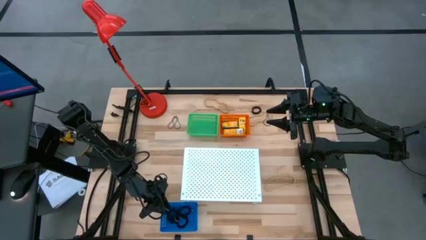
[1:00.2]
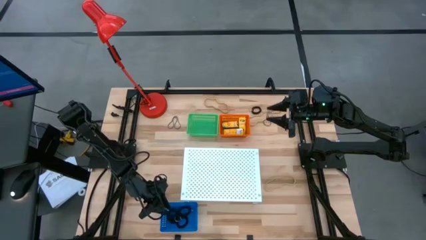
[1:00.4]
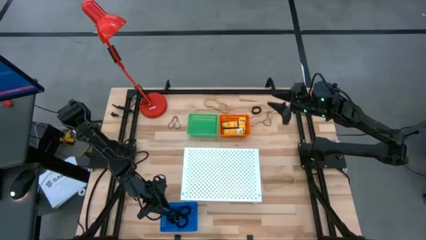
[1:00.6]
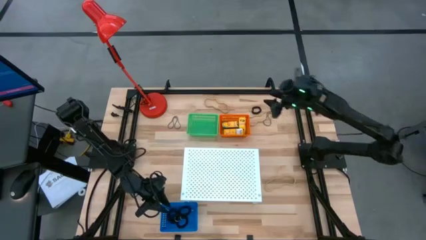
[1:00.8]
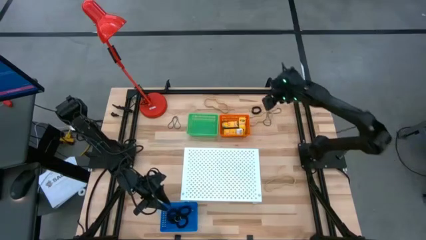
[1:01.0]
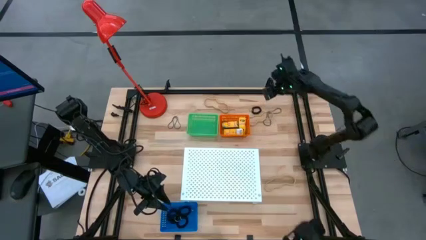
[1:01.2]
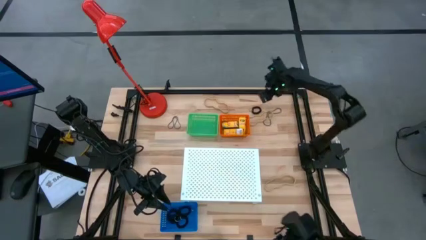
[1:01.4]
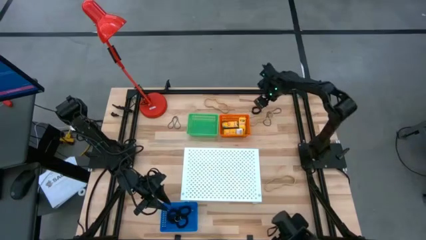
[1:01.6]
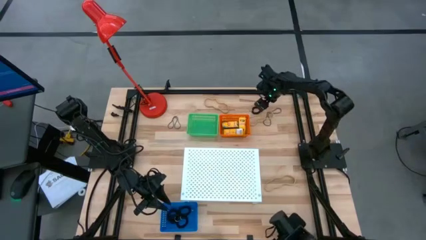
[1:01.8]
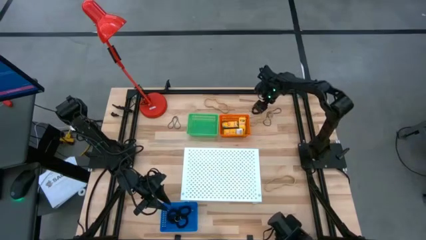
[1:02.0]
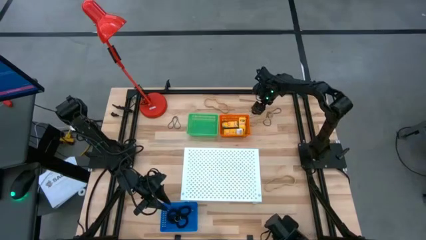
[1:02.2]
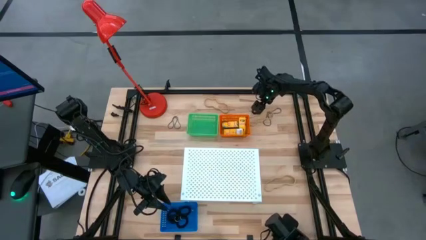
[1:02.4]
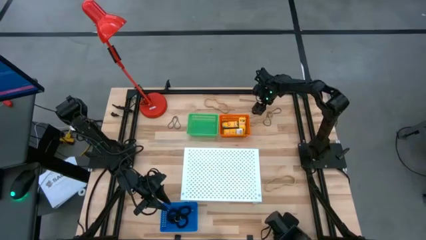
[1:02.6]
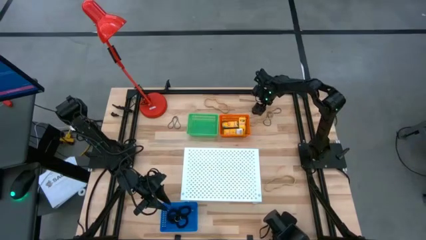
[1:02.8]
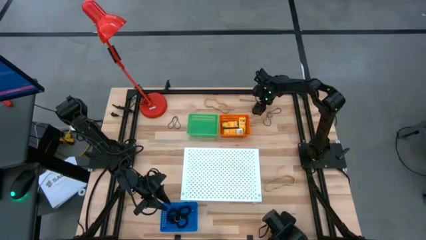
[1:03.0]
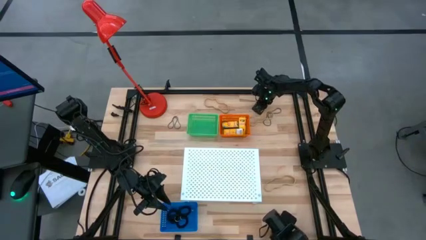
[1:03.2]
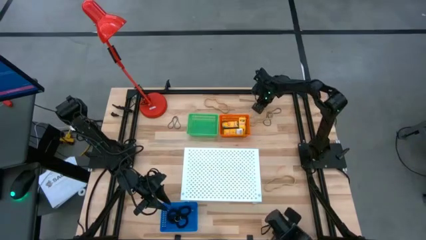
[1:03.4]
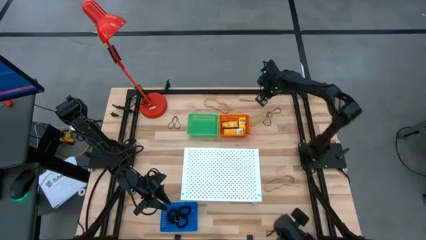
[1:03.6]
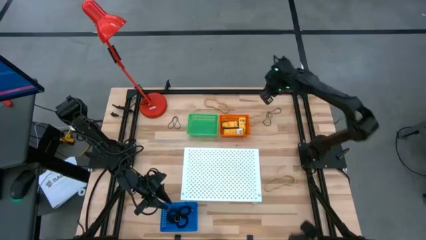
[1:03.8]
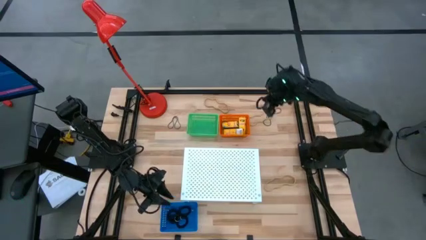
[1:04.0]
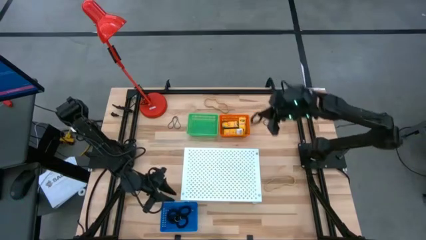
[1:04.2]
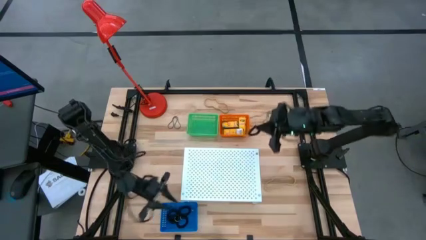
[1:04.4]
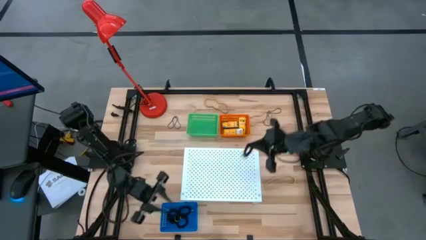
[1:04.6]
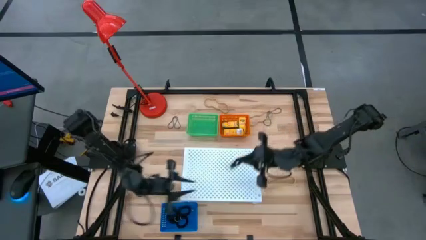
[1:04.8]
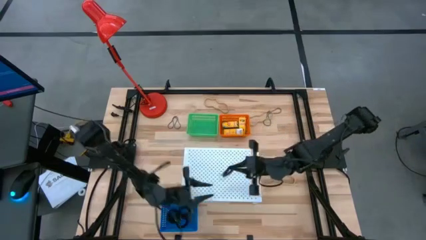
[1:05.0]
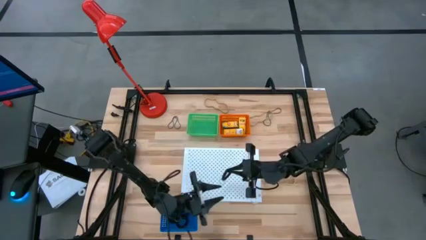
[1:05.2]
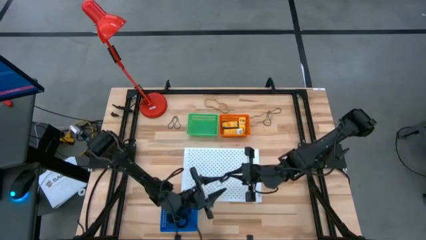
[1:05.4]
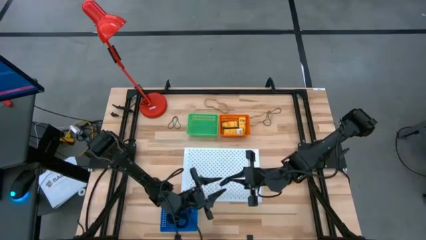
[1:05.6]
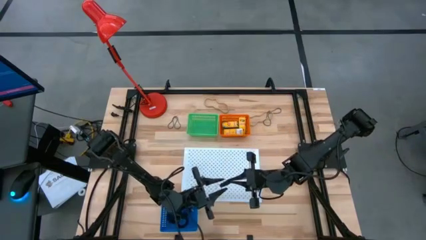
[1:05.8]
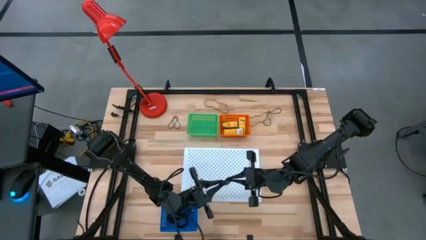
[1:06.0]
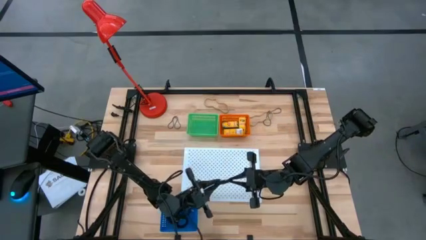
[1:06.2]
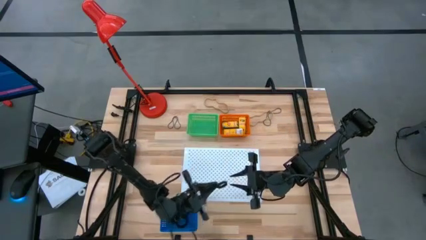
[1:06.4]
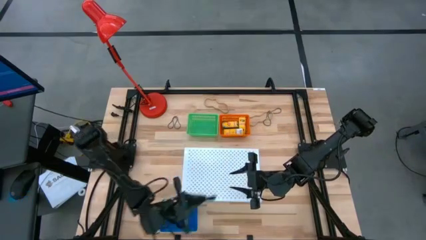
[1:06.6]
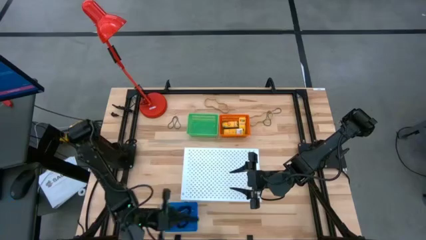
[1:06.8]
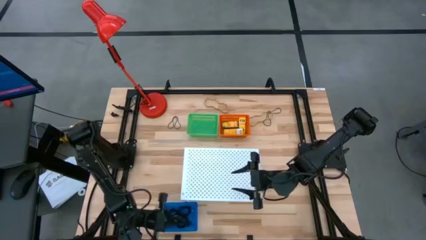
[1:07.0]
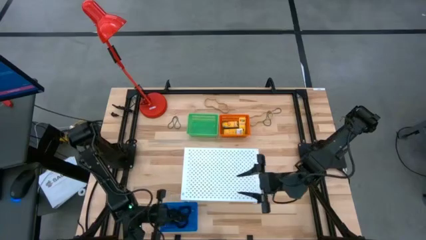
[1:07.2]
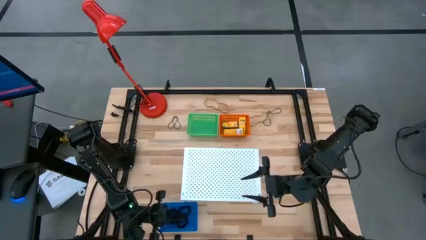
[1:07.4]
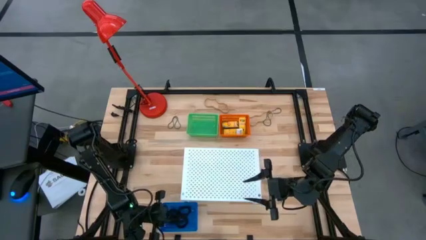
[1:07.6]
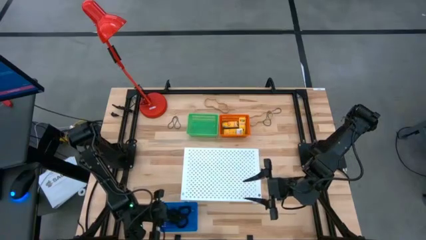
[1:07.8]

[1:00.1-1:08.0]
Task: Pick & Place Office Desk Supplies
Put the black spring keychain into the blue bin

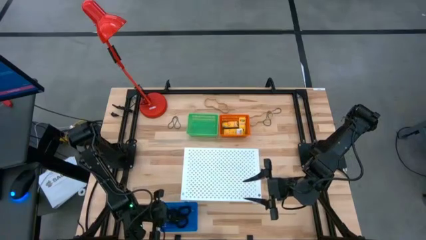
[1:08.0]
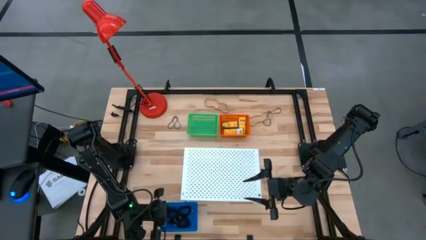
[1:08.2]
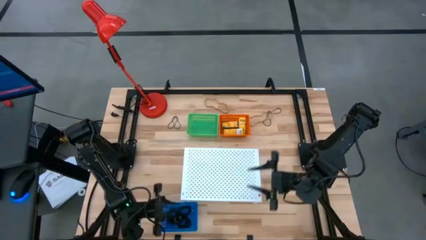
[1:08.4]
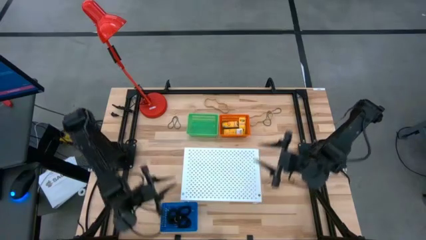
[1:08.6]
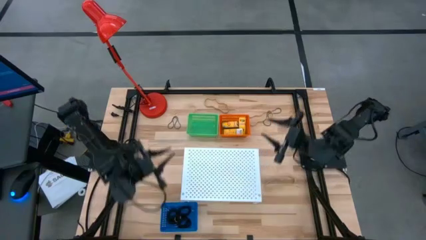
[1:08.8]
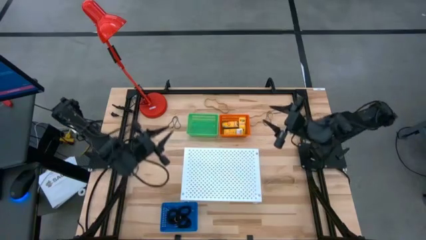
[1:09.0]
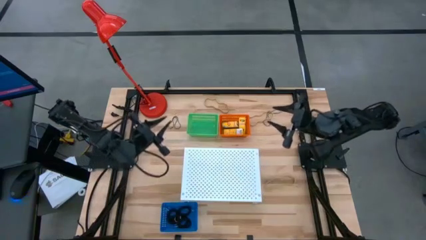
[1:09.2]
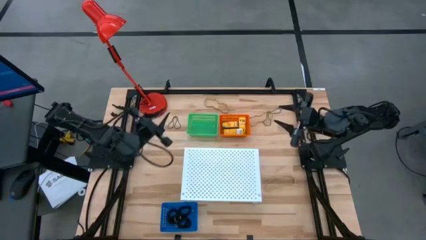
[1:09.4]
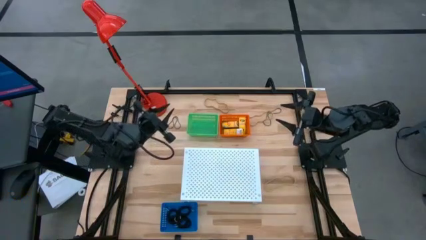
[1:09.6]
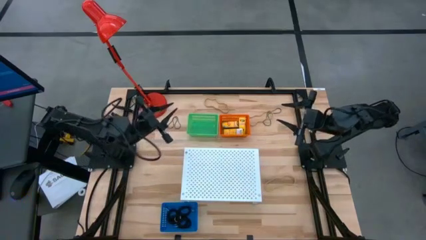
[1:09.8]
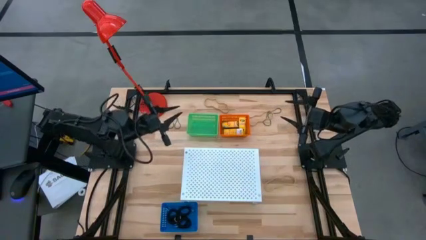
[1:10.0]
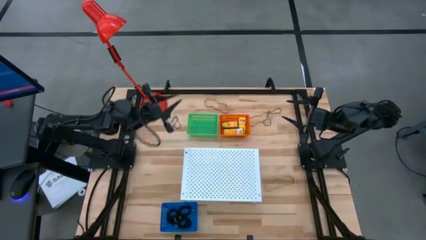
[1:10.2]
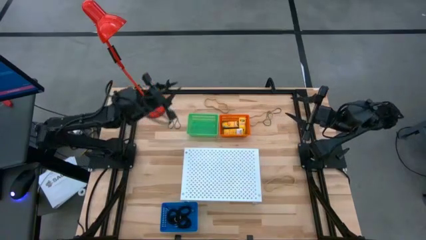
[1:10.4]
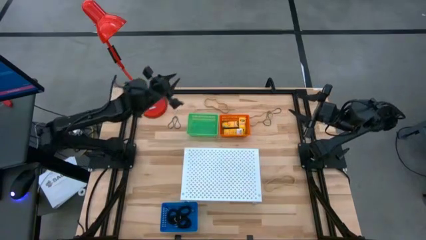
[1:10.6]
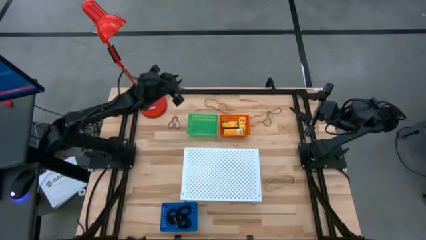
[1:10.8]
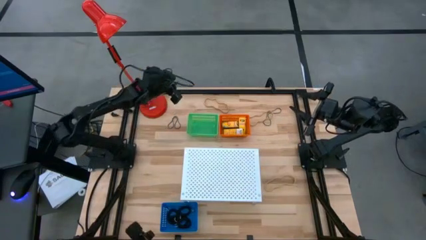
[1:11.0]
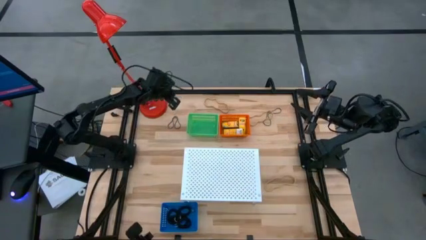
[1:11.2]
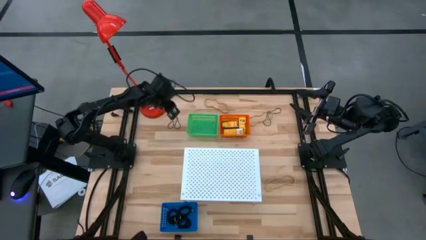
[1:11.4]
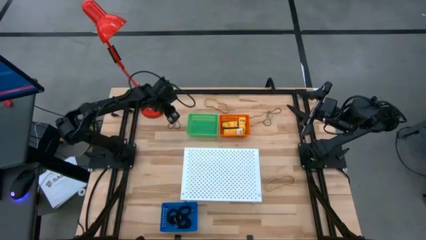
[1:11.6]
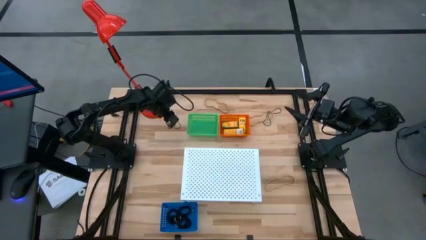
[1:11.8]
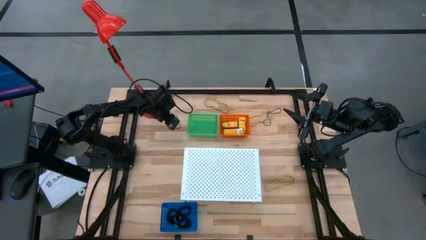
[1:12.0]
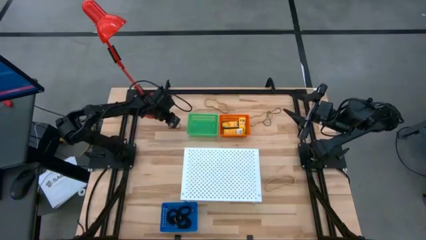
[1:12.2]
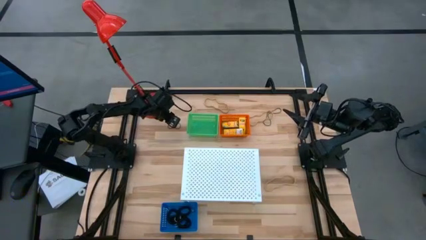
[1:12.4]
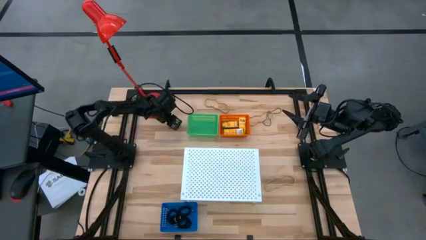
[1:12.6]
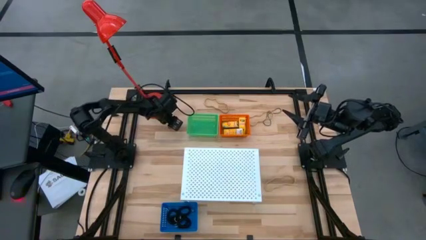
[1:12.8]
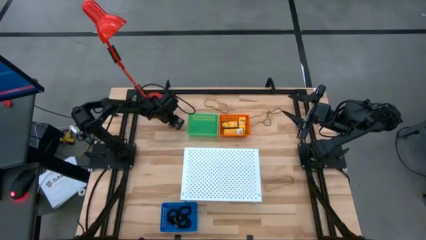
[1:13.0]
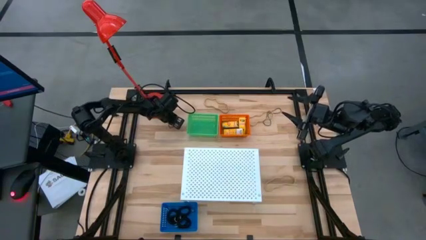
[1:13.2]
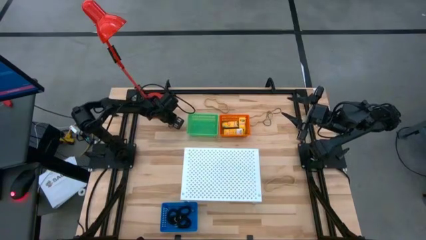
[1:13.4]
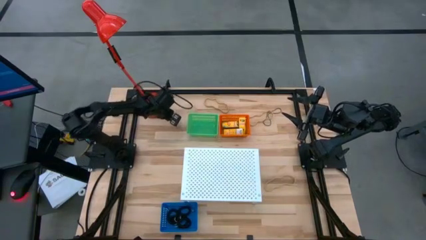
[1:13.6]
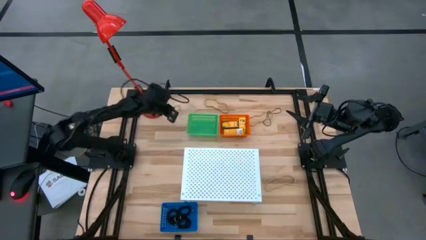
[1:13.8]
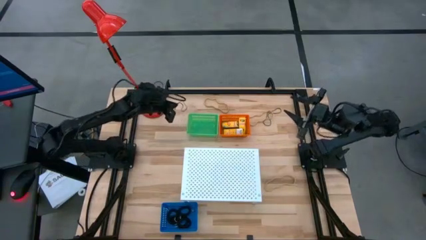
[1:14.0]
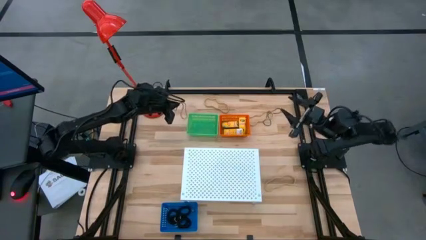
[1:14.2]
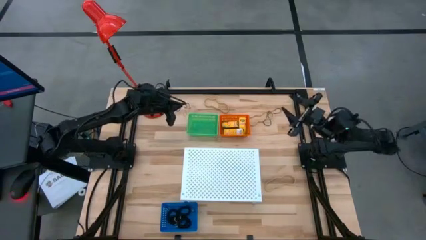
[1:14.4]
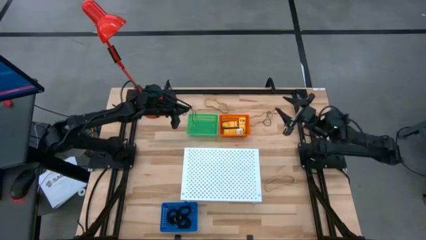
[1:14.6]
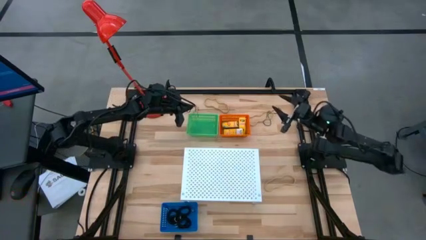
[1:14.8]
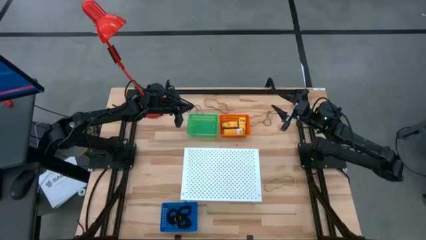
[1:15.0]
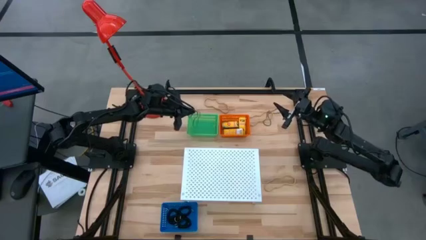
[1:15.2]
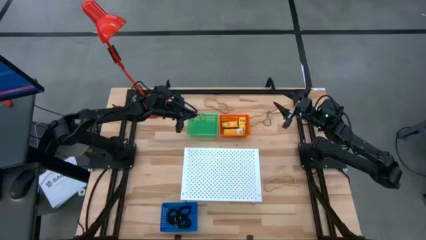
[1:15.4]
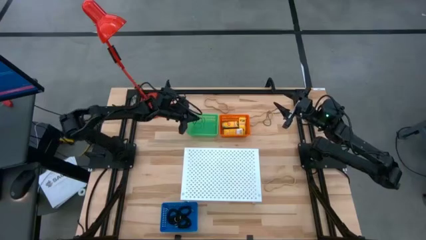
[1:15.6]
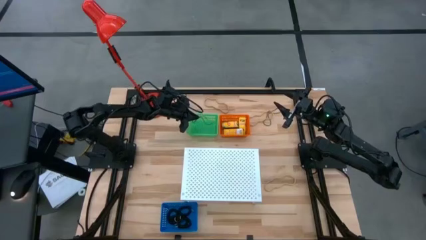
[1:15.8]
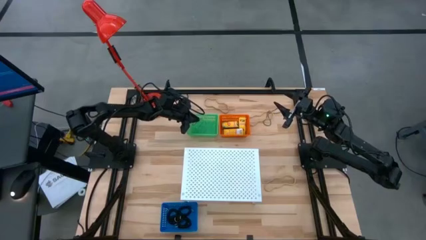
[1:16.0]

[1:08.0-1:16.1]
Put the violet rubber band into the green bin
